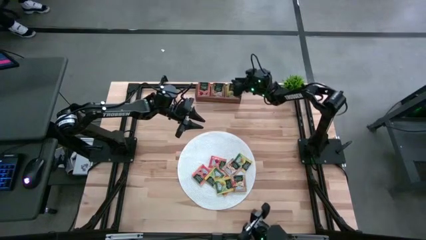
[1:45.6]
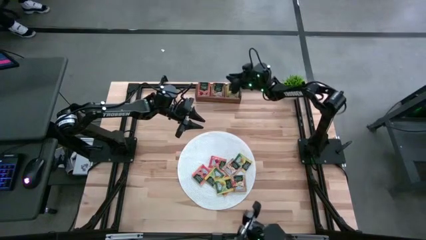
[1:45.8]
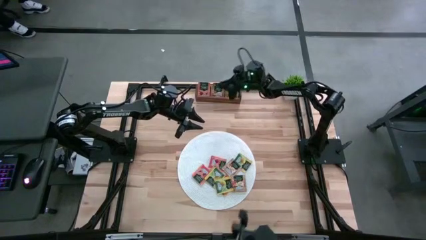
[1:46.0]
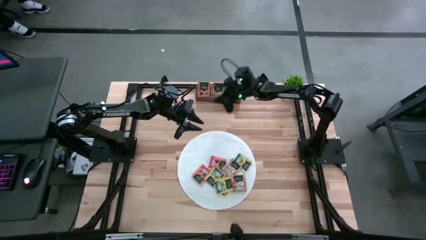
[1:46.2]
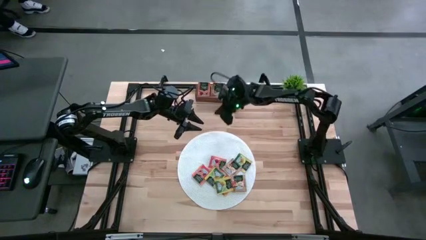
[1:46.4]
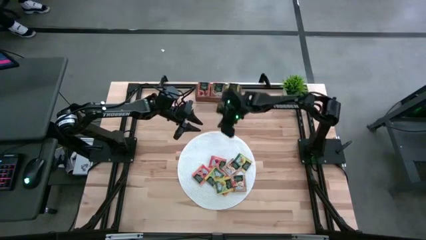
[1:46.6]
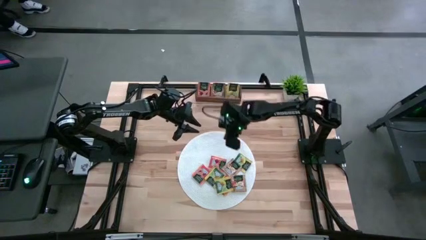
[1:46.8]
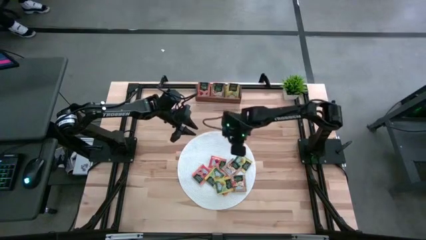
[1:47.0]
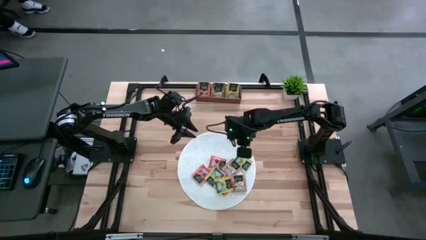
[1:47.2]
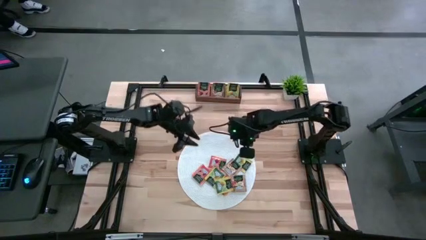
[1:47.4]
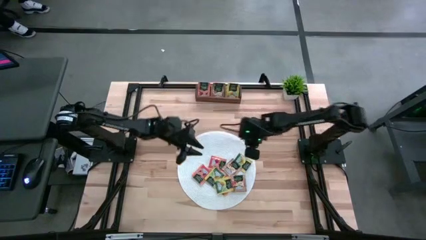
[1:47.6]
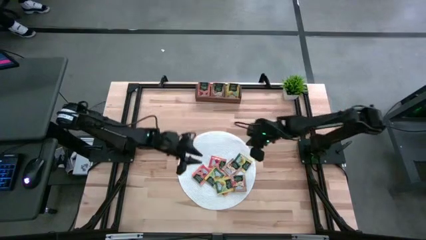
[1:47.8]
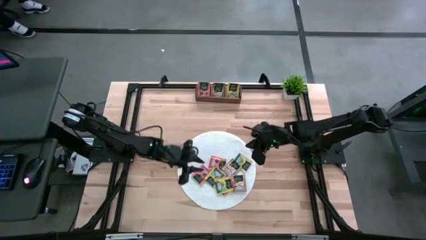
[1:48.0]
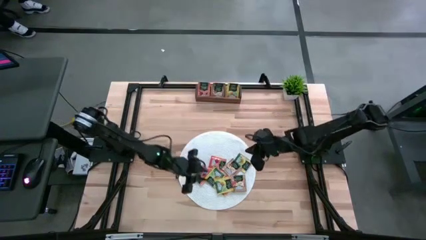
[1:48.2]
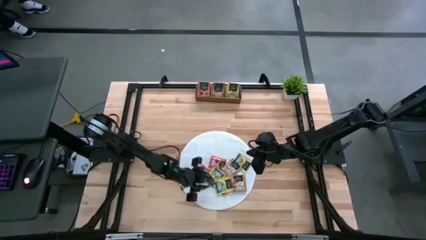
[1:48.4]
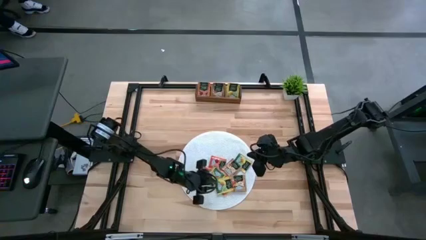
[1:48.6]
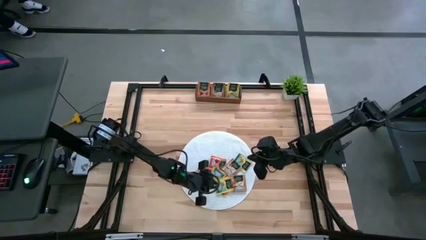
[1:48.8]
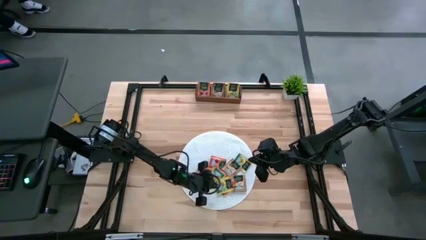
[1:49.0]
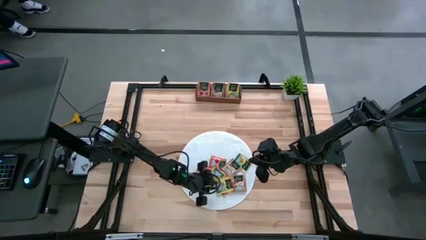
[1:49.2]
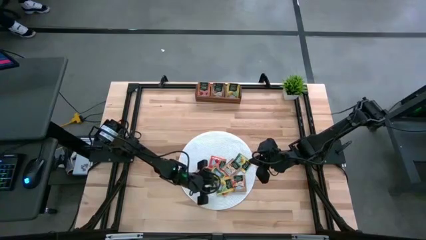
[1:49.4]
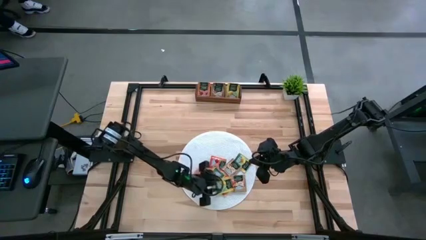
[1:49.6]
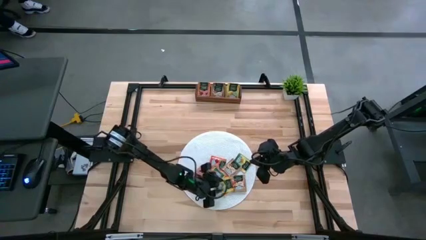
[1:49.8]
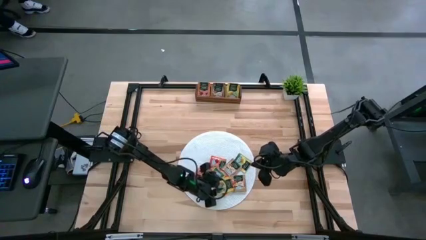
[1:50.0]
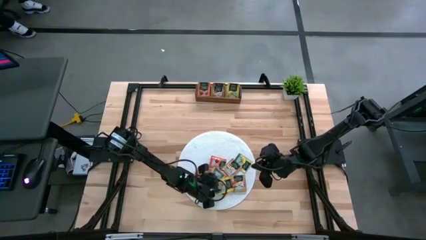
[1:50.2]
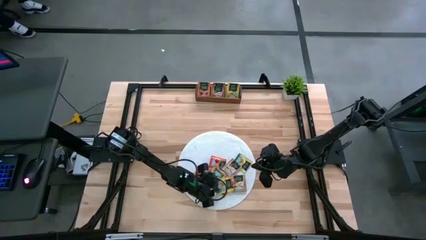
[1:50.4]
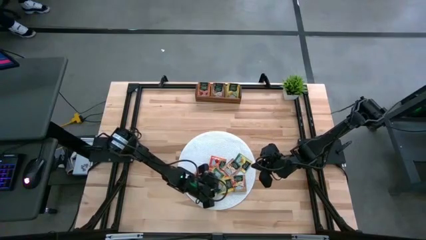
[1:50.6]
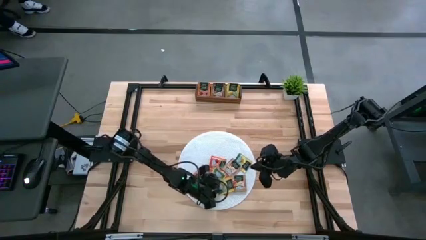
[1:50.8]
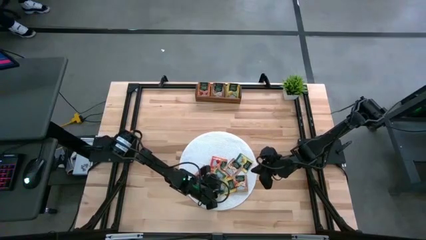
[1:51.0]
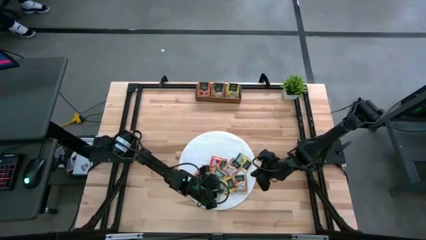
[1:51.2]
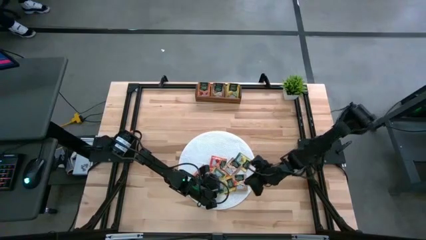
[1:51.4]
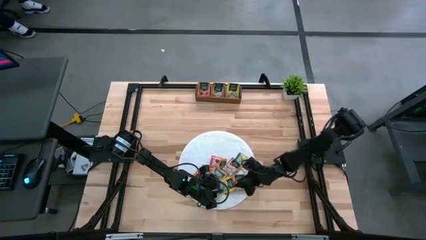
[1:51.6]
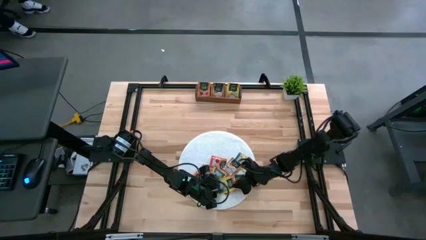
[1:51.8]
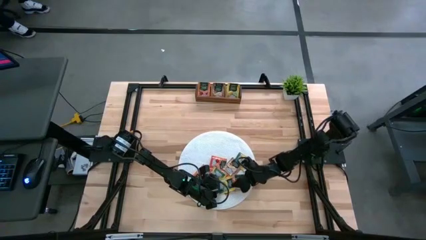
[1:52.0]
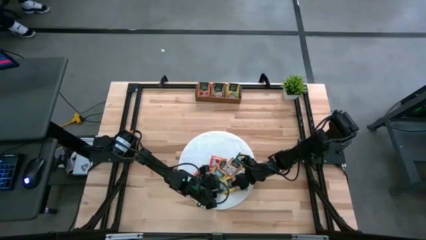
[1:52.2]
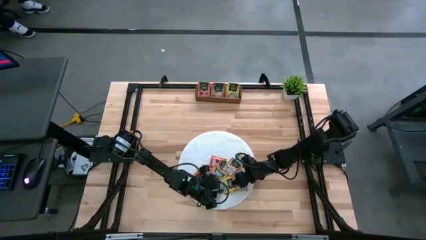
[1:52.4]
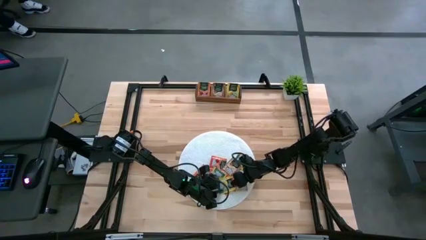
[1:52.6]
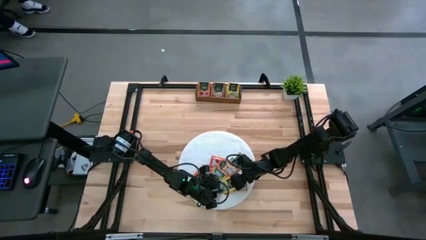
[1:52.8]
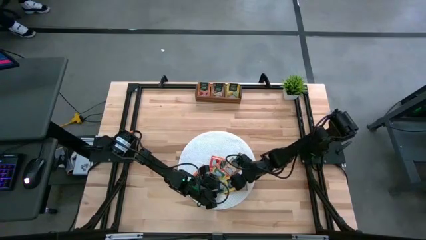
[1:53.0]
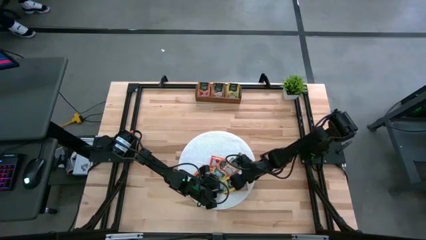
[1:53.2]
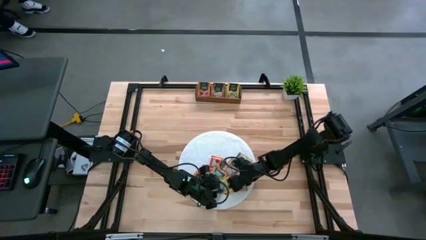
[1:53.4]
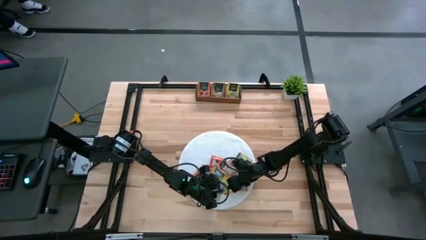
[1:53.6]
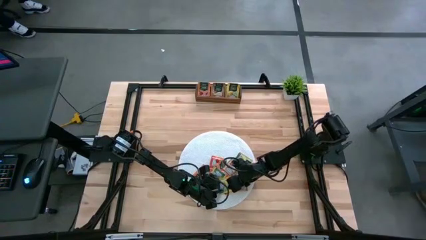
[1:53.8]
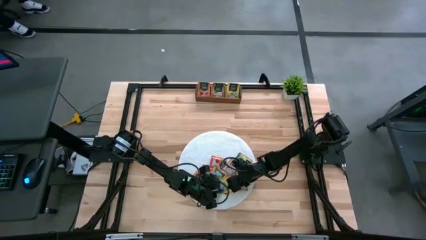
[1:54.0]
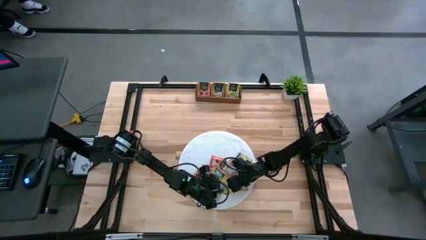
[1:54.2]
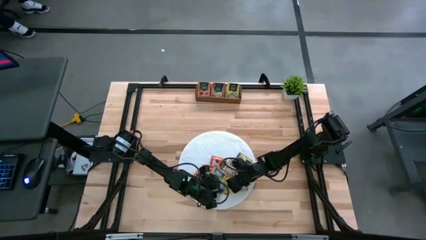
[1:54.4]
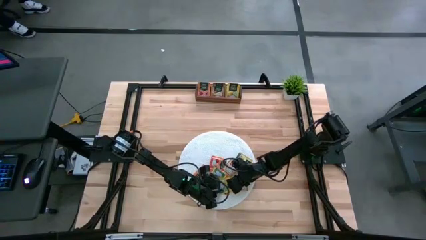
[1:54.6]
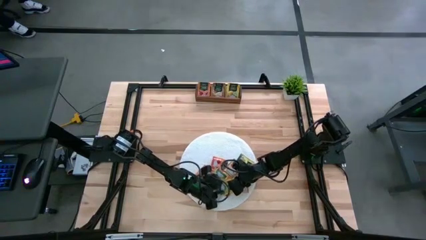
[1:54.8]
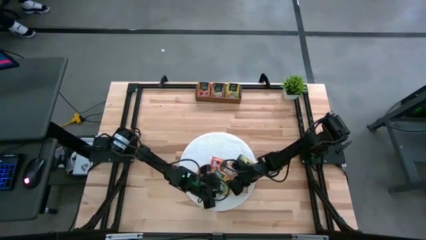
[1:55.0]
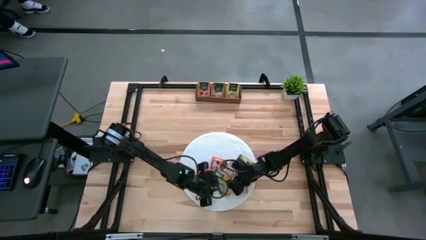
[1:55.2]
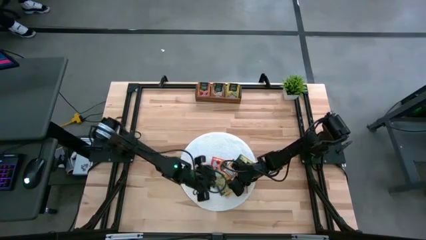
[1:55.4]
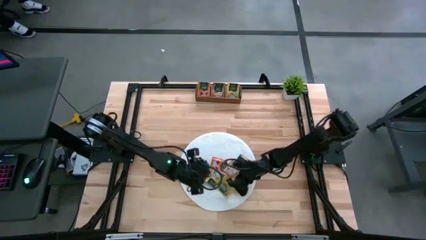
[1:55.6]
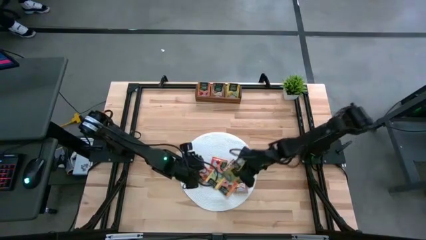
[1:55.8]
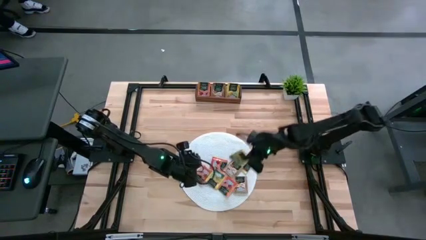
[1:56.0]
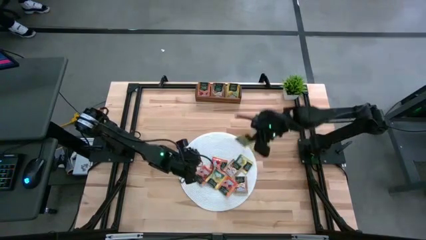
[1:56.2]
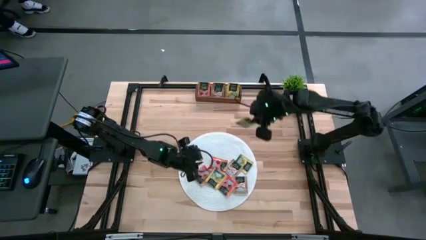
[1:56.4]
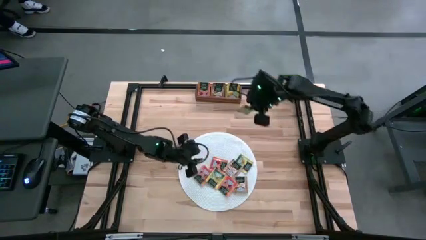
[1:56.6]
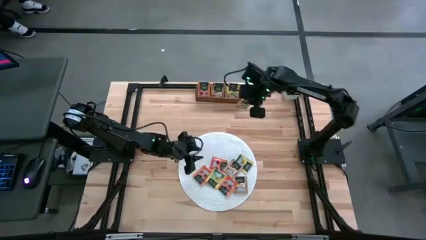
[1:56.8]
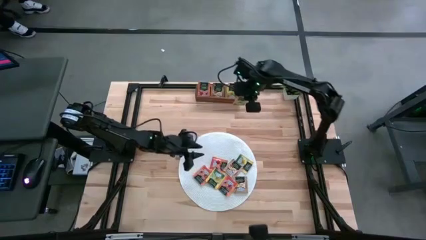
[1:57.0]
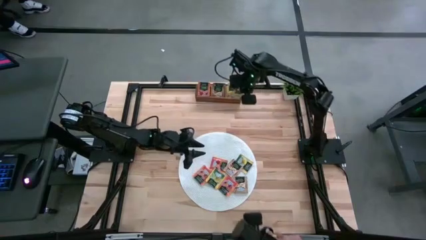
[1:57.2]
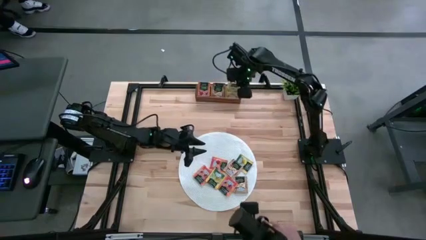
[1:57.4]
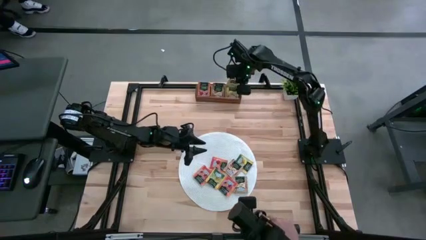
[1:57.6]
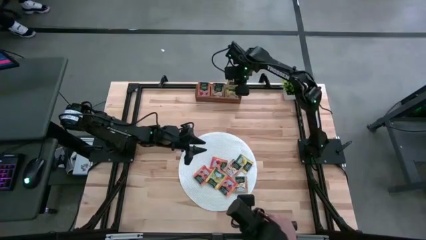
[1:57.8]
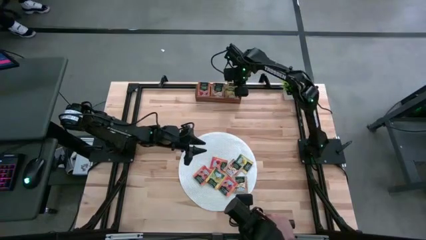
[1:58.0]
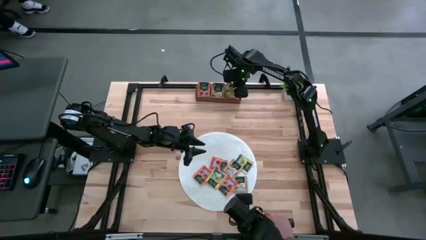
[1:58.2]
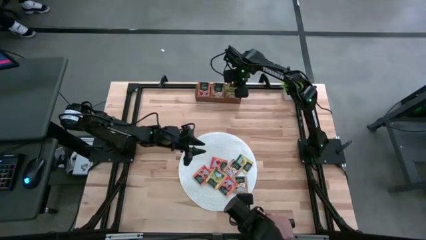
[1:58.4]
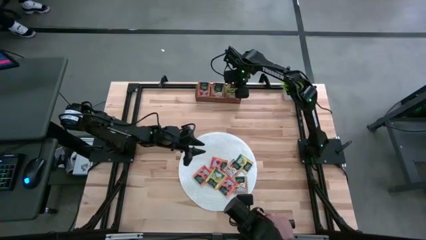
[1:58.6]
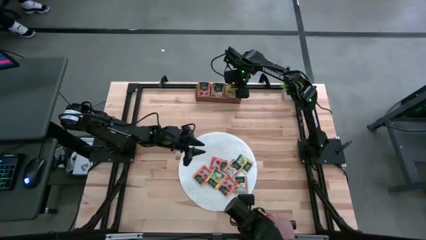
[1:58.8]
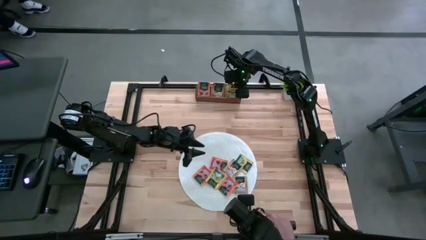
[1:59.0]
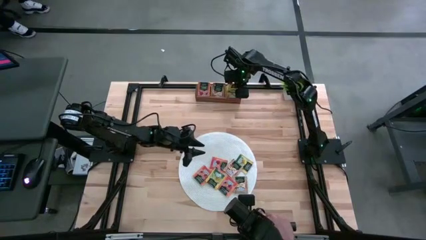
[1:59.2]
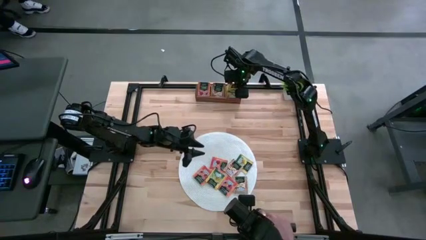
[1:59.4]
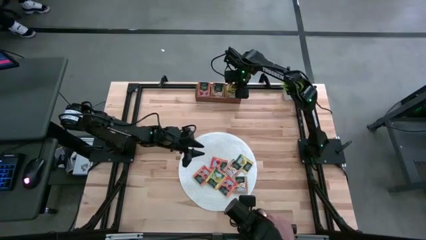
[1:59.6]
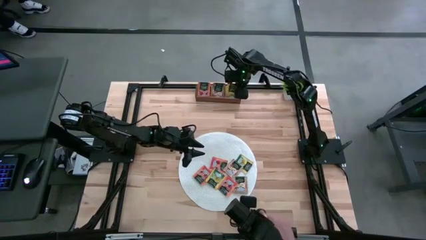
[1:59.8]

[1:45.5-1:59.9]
Task: Pick & Place Tea
Put the yellow tea bag into the right section of the wooden organizer
